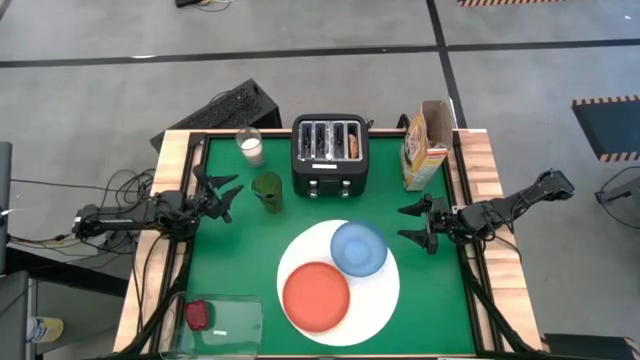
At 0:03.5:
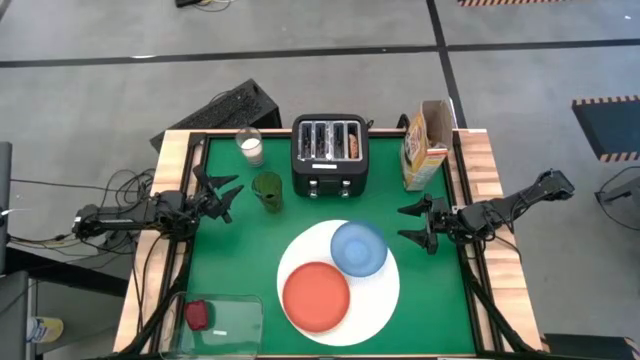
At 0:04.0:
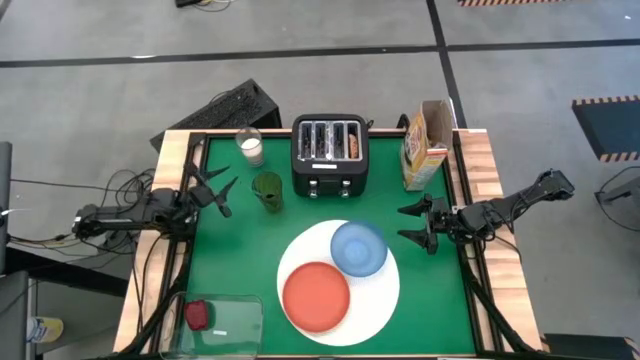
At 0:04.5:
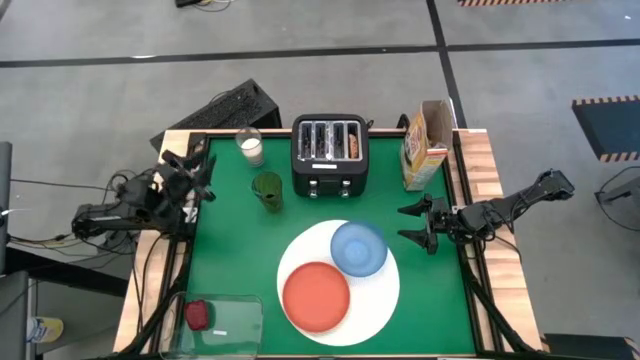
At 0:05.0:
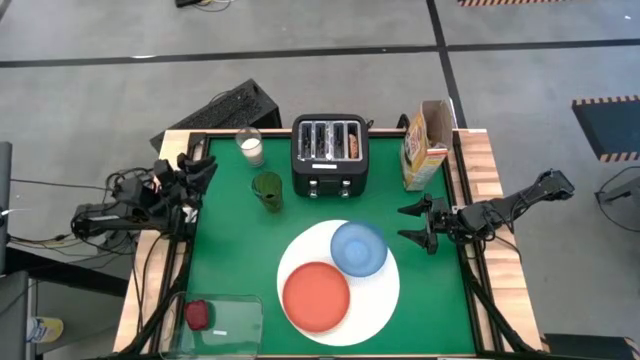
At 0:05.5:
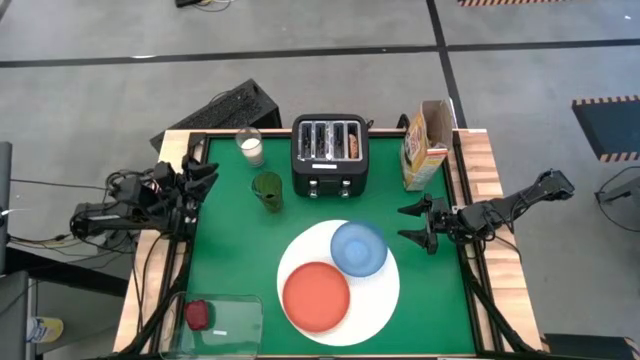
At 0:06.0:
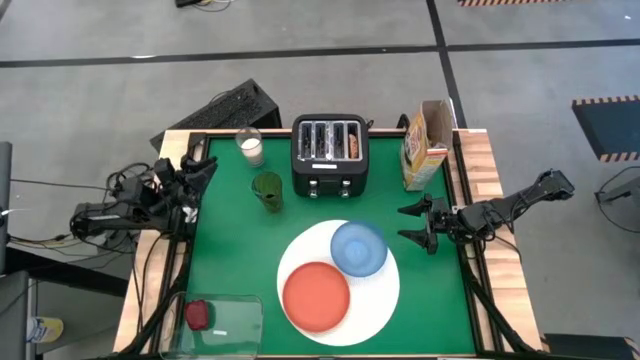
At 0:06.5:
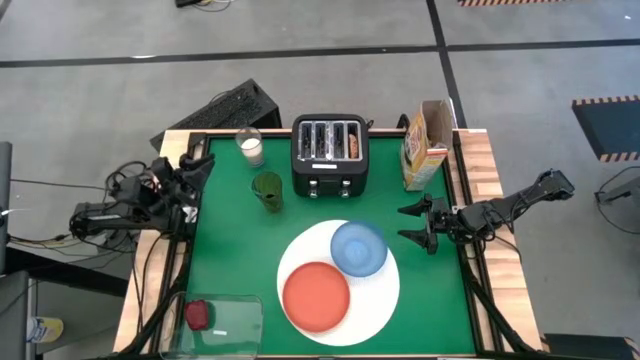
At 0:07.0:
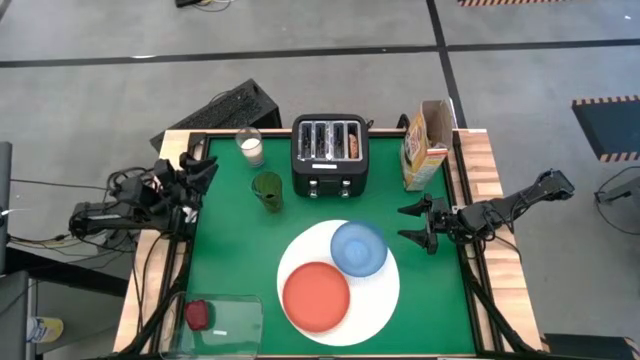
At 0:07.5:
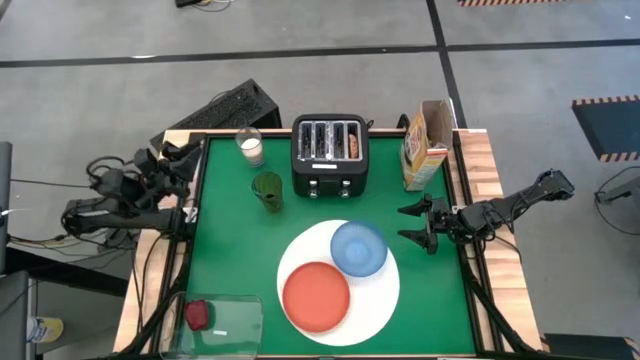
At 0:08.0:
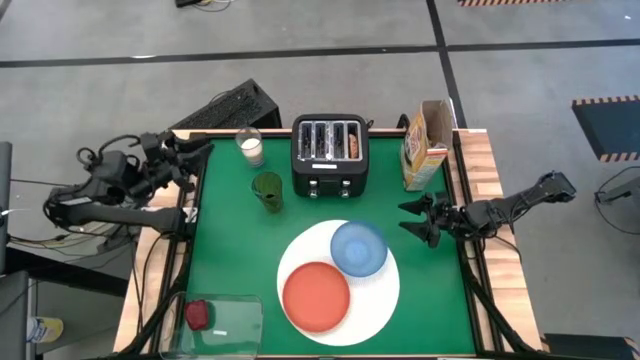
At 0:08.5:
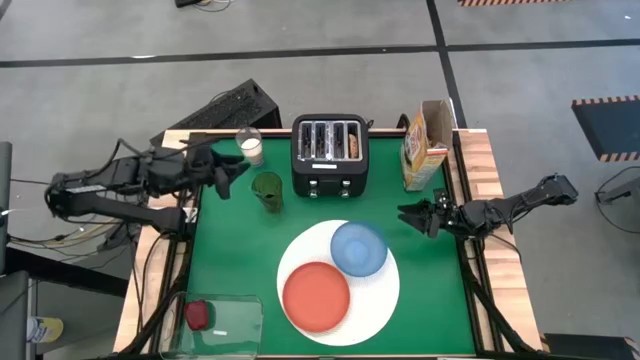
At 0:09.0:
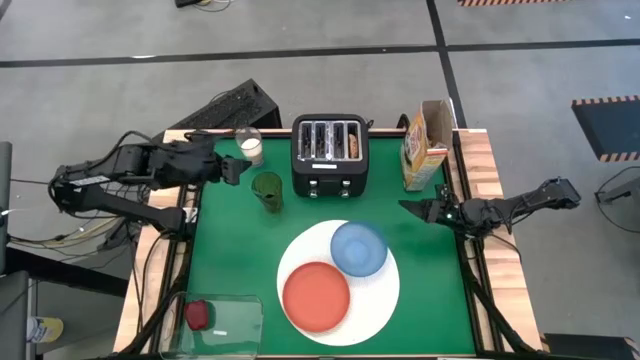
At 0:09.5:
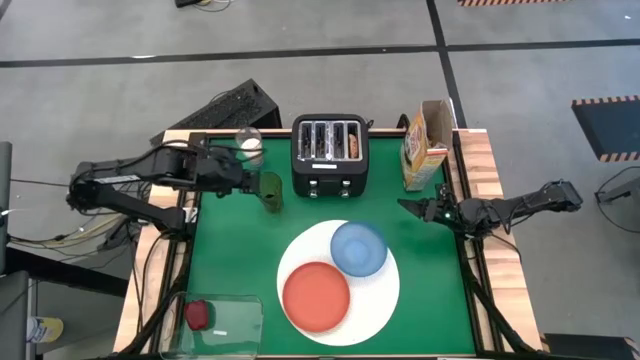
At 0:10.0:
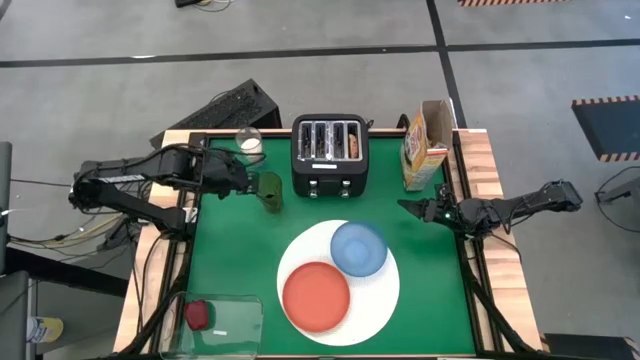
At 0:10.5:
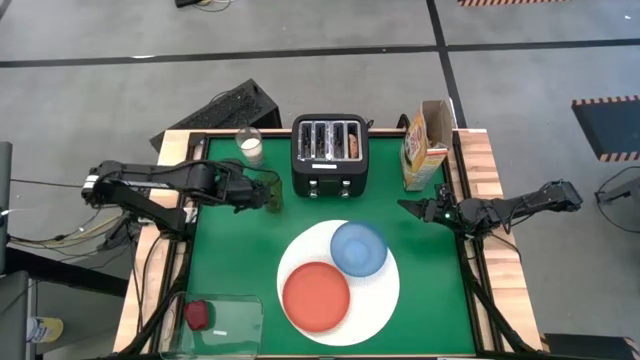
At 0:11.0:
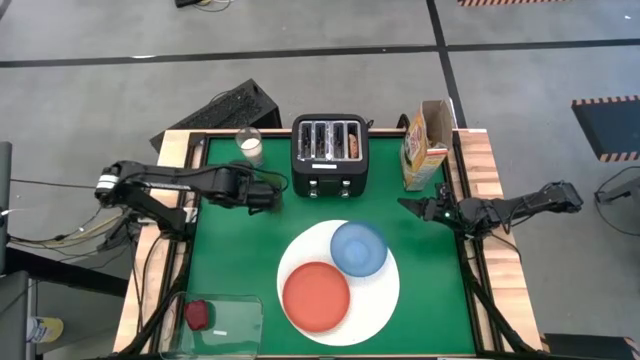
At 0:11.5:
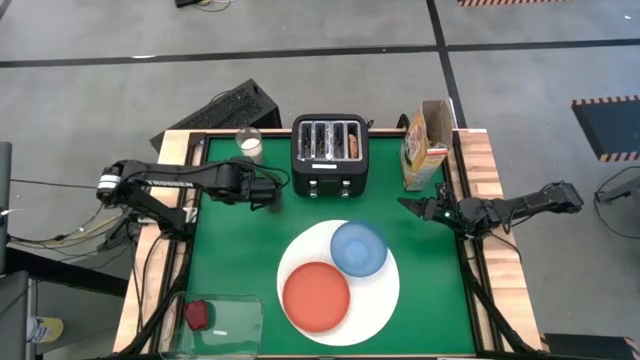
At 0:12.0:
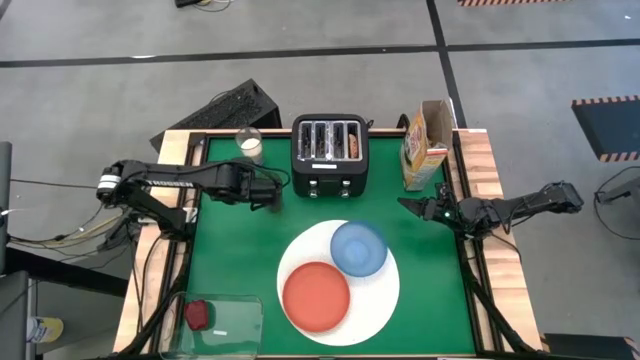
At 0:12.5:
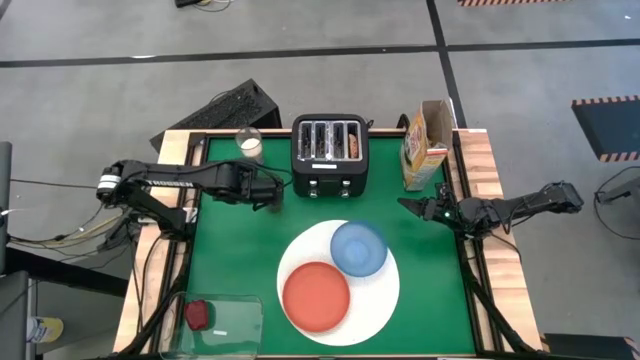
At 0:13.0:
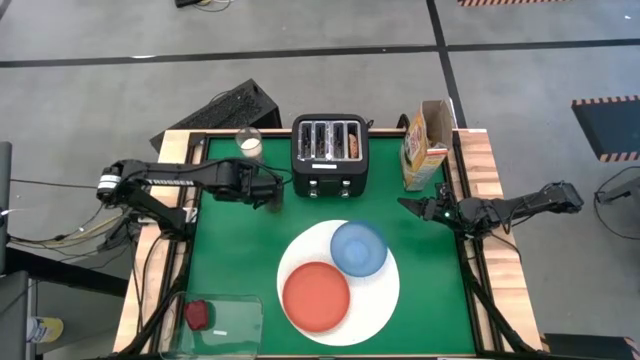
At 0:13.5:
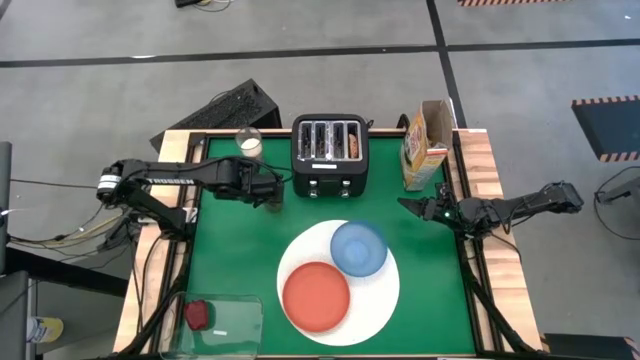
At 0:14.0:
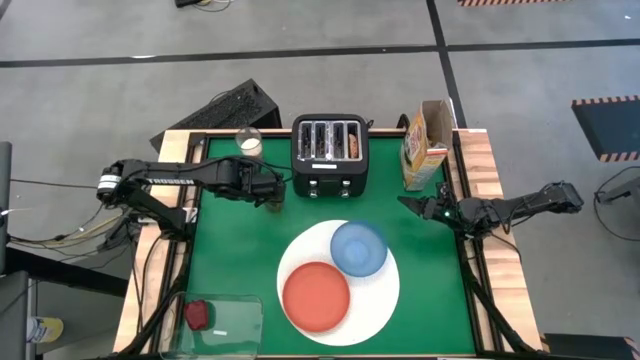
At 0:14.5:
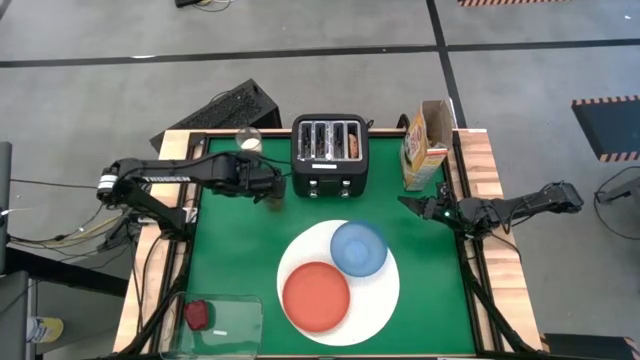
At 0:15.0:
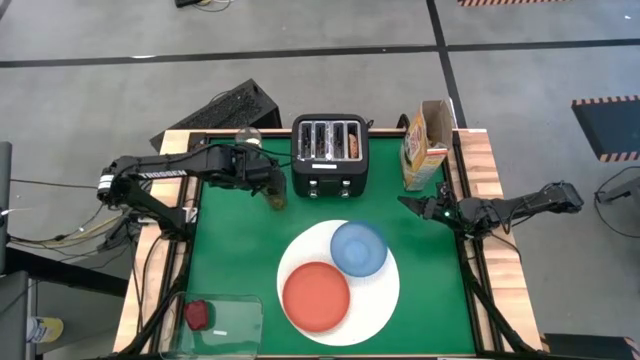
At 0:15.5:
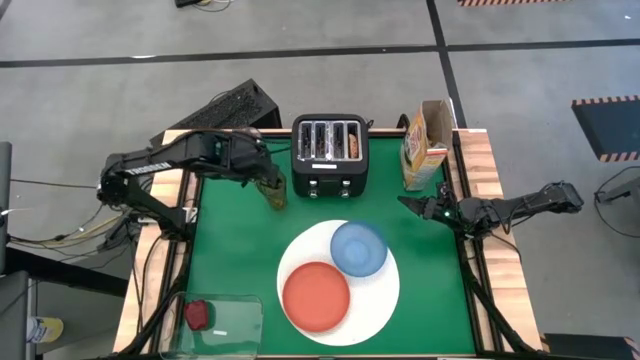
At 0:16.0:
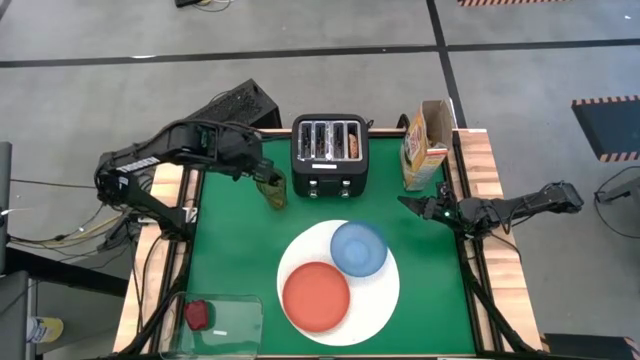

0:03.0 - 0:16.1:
Task: Arrange a breakfast setting
Put the blue spoon on the white placemat to the right of the blue bowl

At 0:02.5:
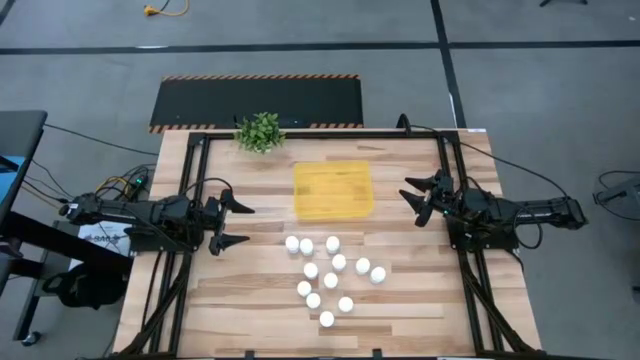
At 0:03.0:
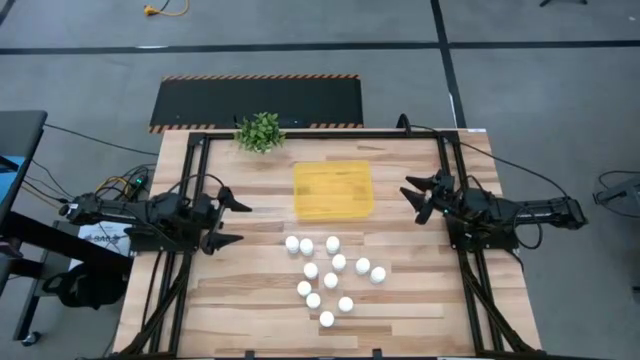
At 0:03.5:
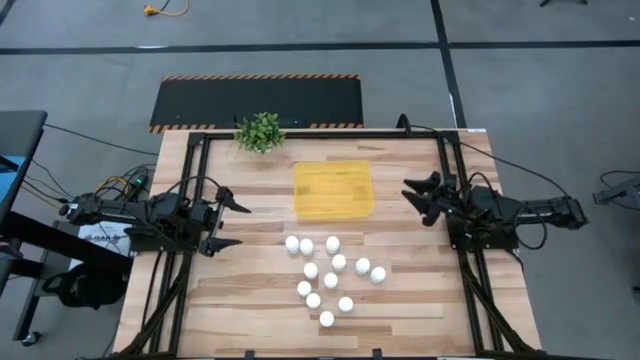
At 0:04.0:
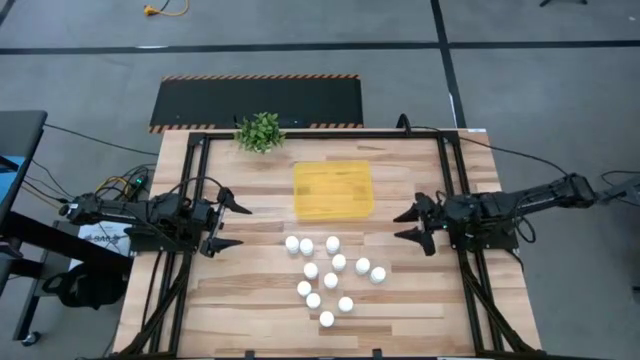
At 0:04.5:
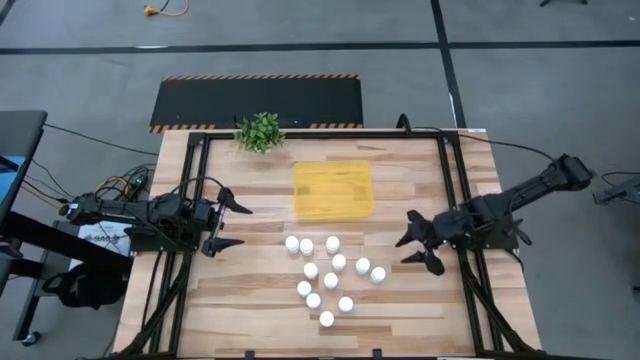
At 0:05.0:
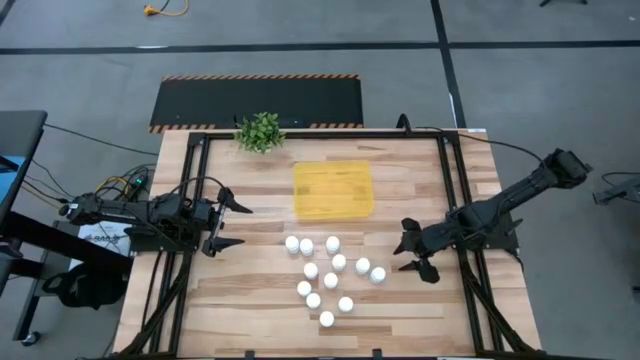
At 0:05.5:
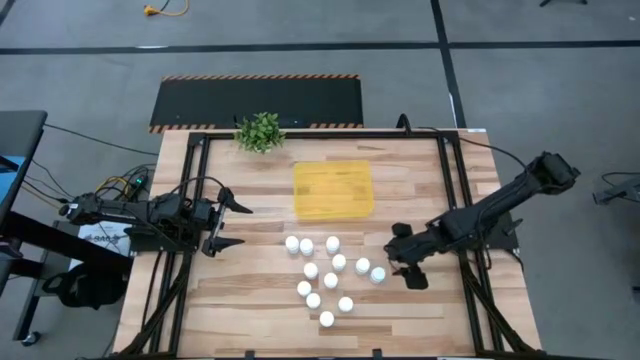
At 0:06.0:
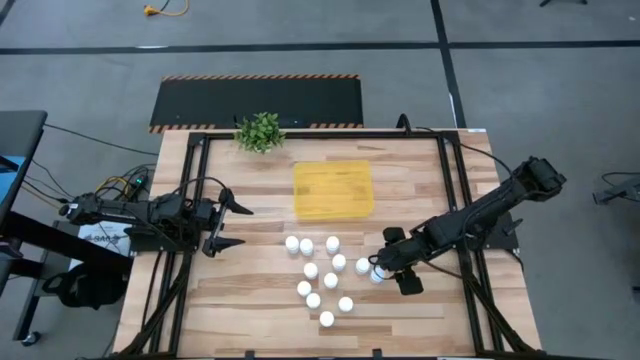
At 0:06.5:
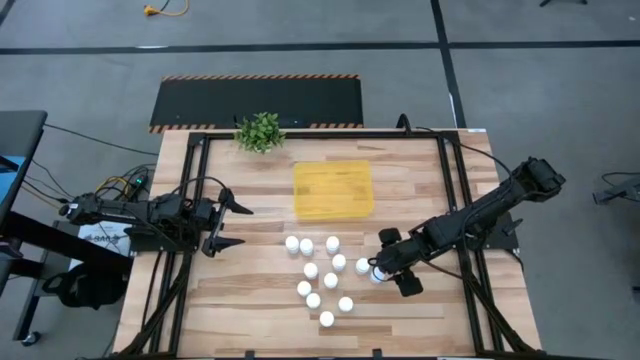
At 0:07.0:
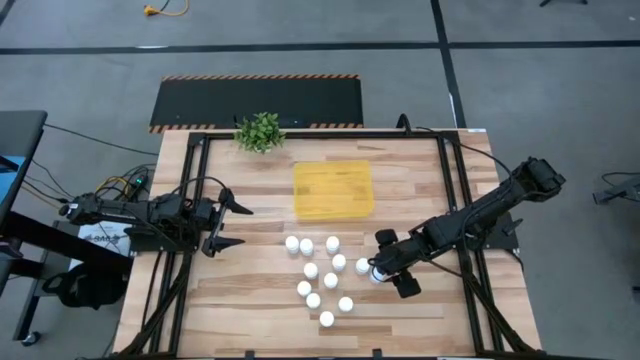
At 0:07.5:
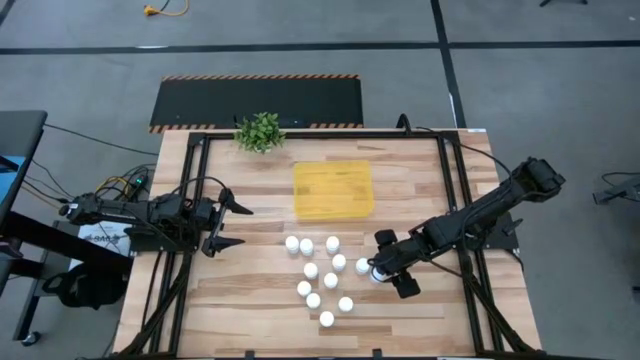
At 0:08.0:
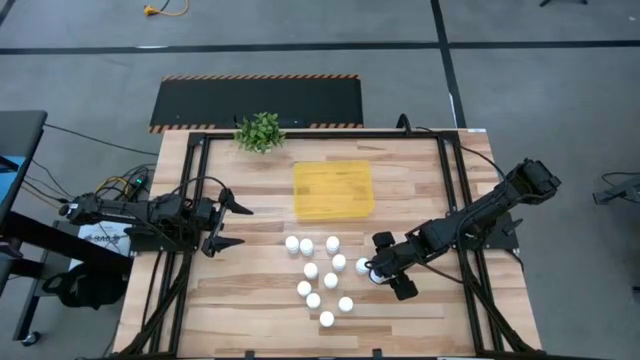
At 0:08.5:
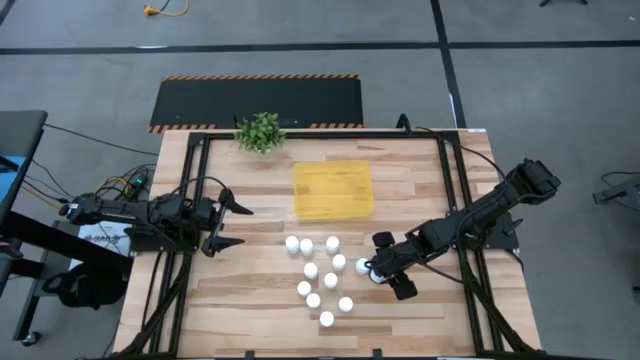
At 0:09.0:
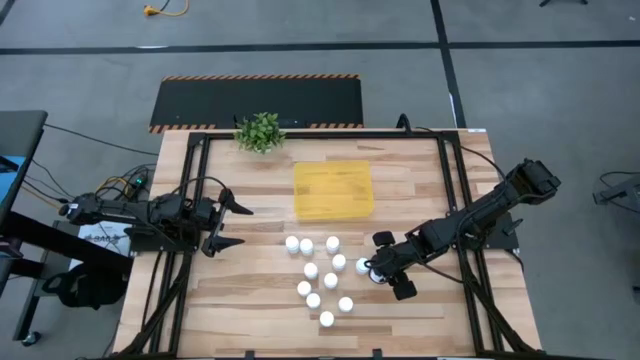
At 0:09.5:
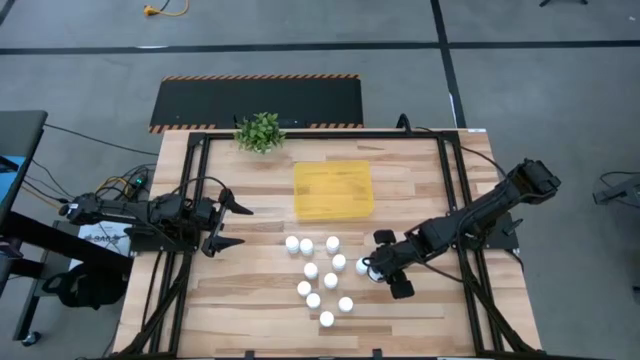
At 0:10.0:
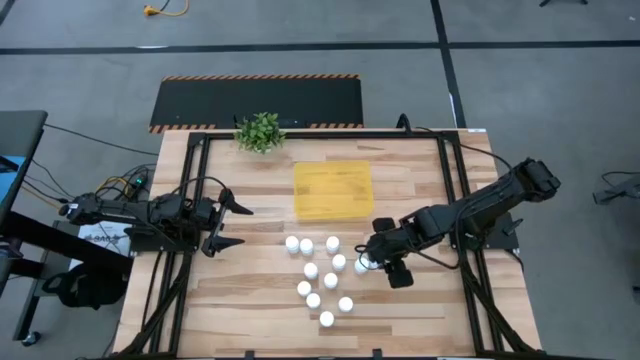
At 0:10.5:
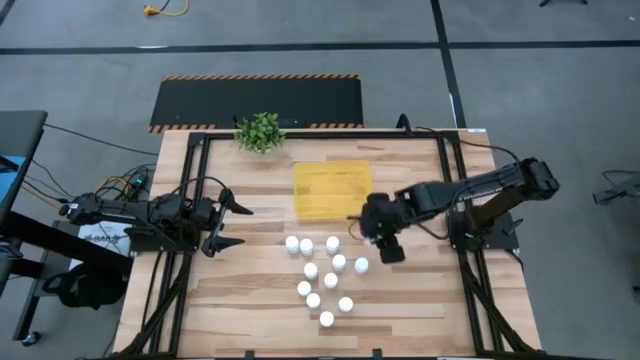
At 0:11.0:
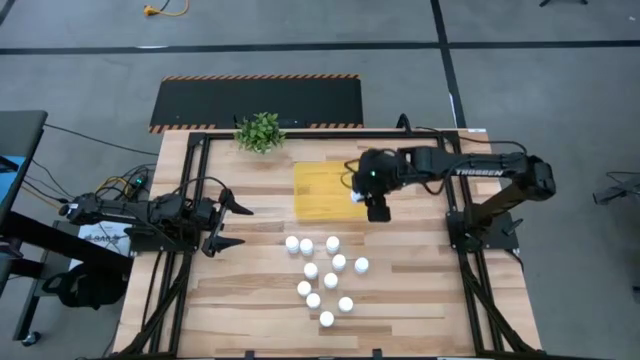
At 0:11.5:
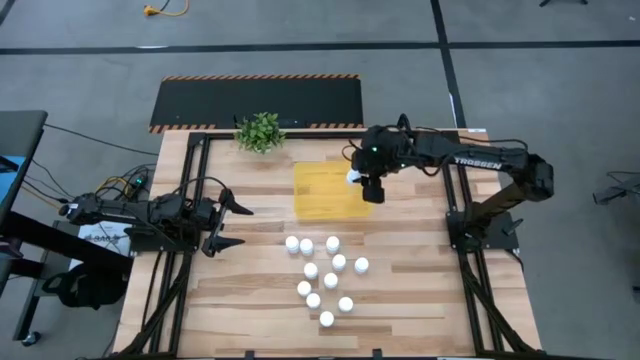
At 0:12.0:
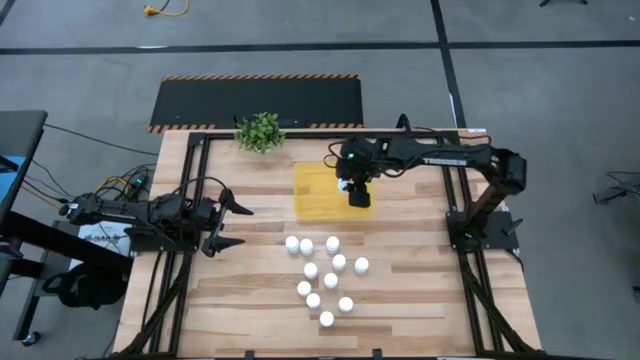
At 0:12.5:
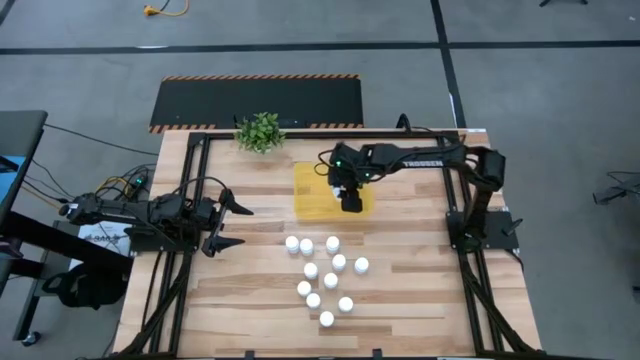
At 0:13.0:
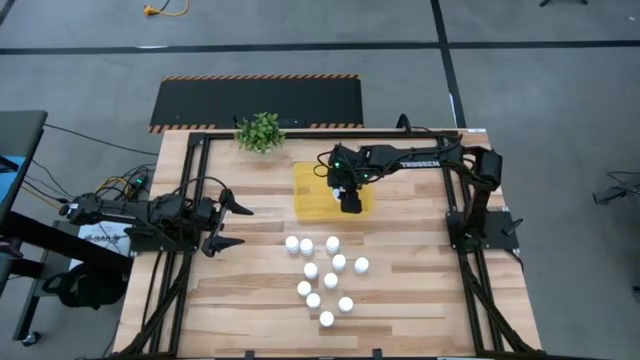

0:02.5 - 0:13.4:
Task: Pick and place pill bottles into a basket
Put the white medicine bottle into the yellow bin
